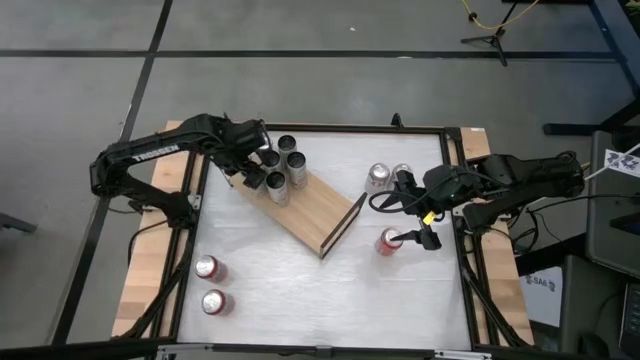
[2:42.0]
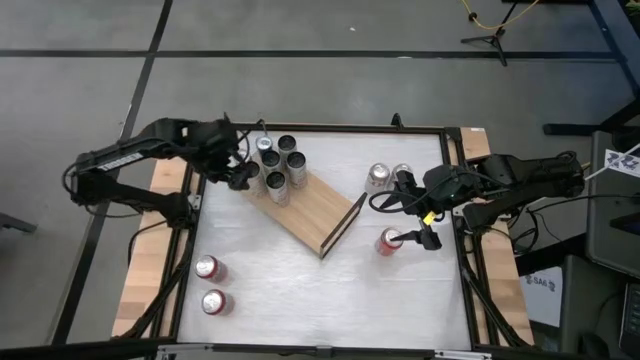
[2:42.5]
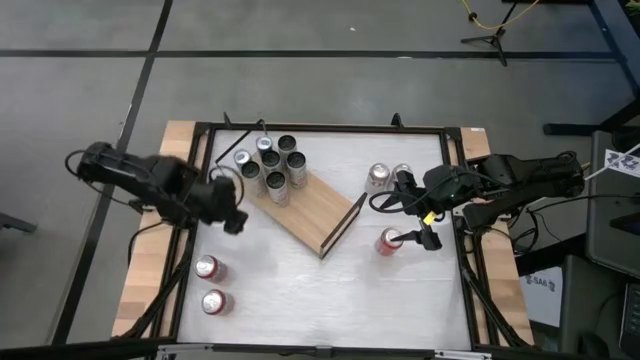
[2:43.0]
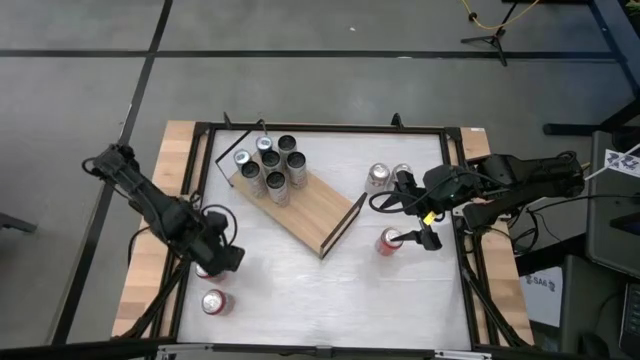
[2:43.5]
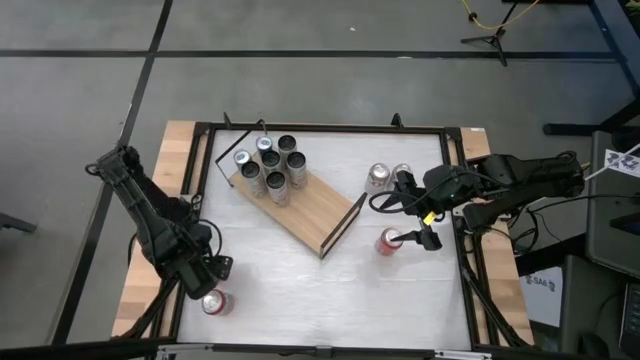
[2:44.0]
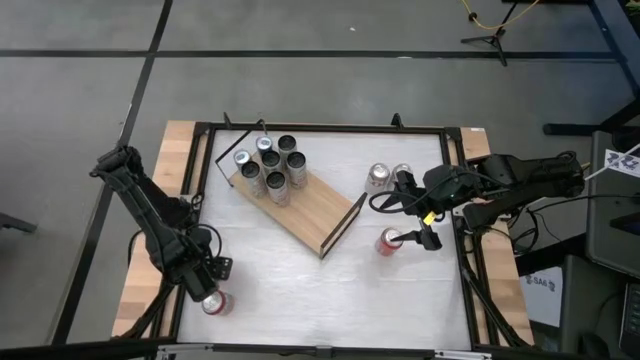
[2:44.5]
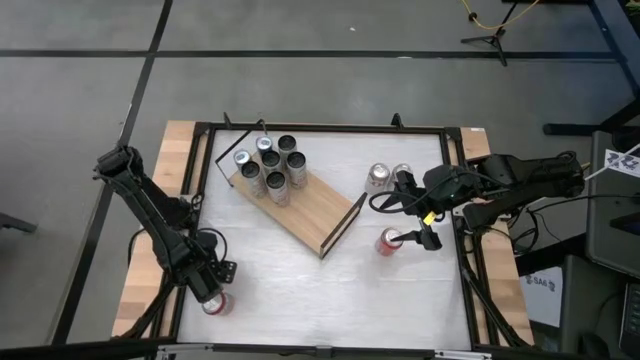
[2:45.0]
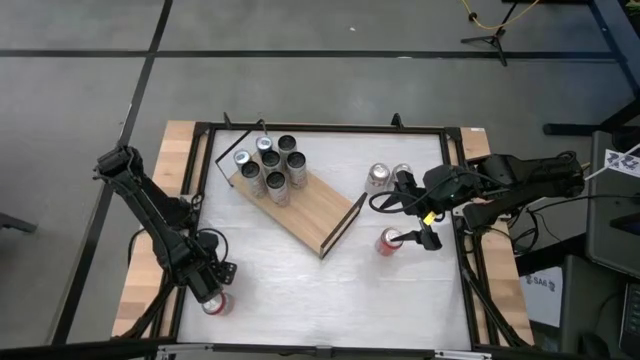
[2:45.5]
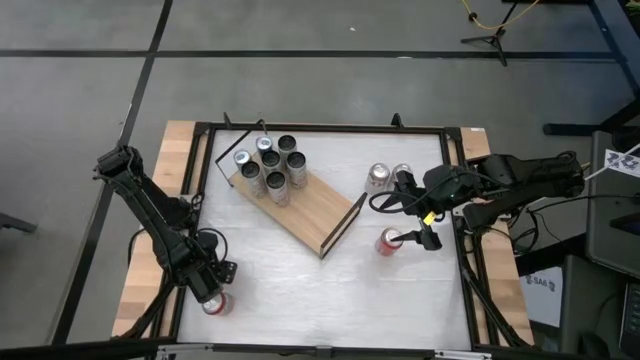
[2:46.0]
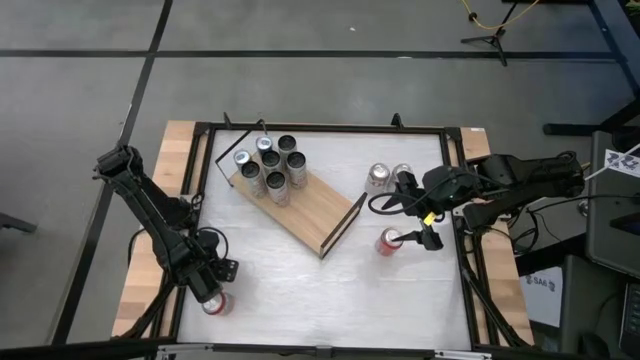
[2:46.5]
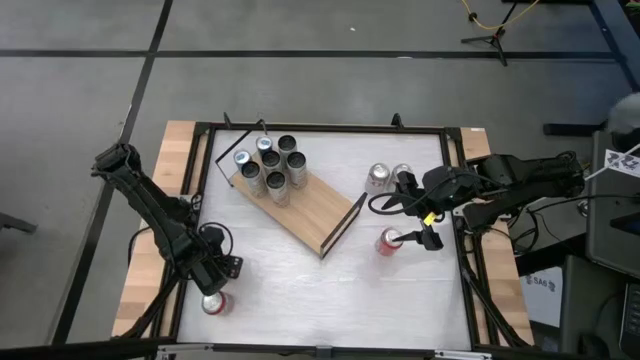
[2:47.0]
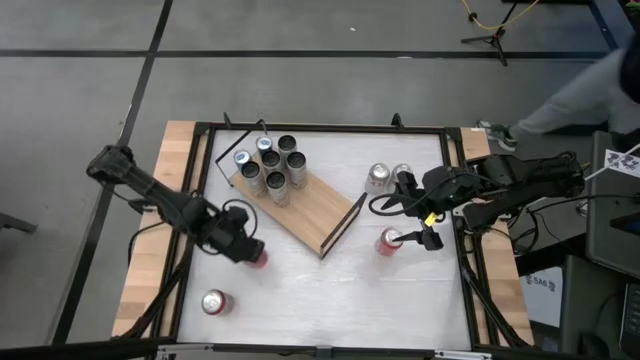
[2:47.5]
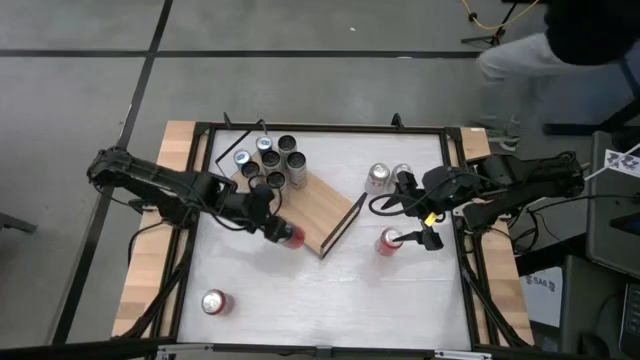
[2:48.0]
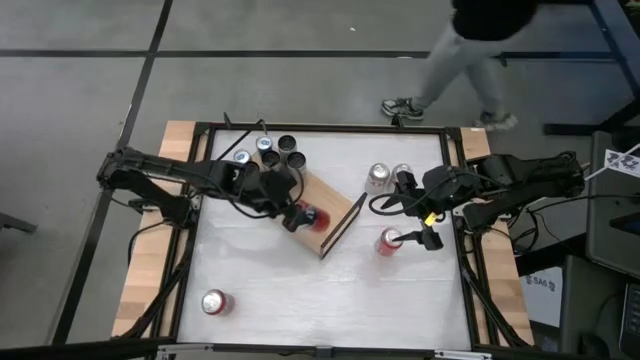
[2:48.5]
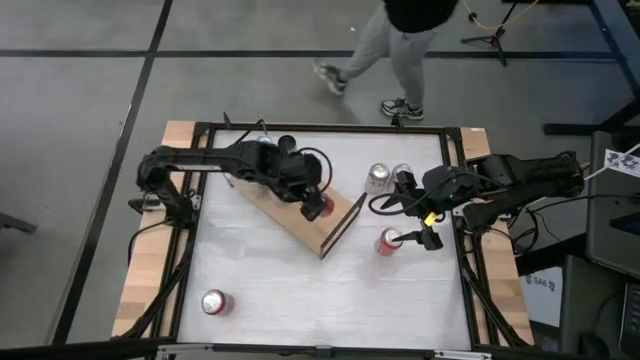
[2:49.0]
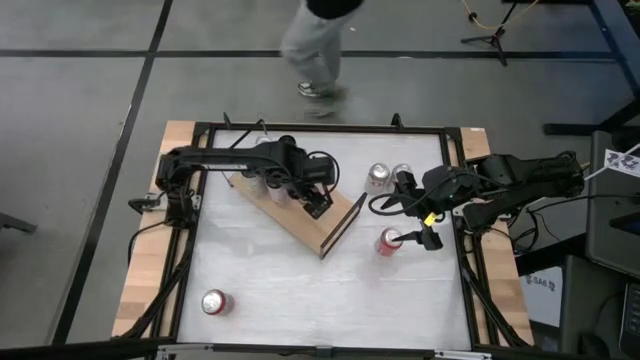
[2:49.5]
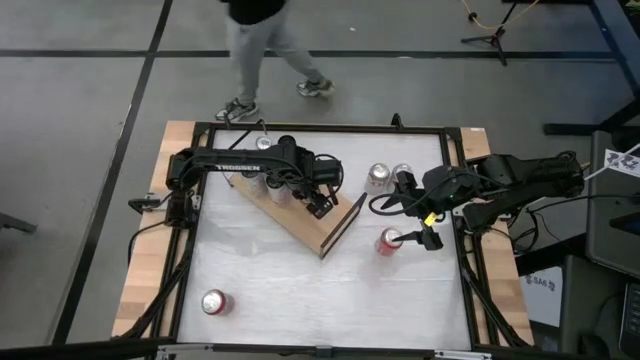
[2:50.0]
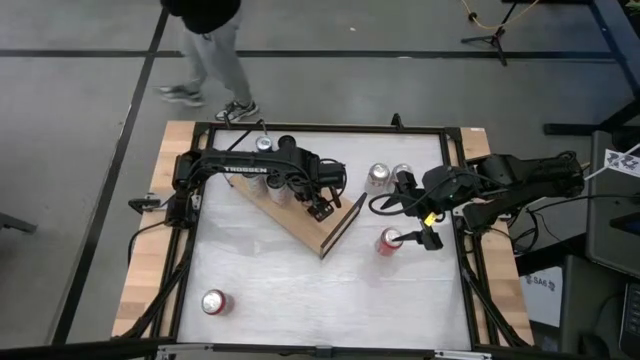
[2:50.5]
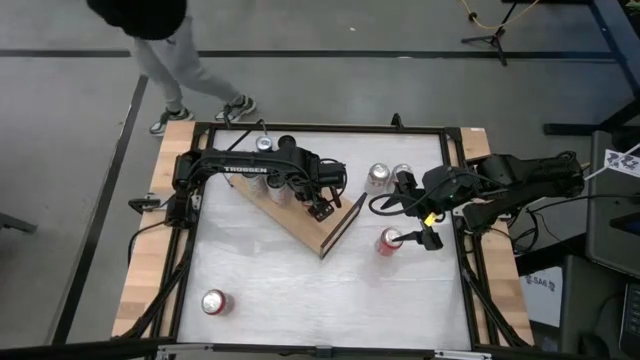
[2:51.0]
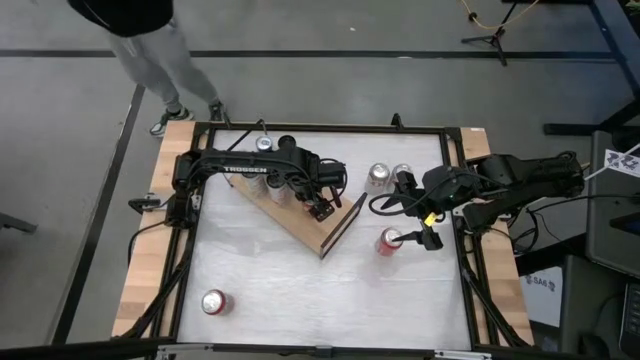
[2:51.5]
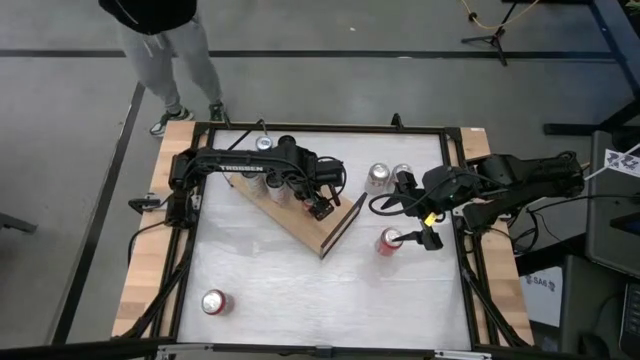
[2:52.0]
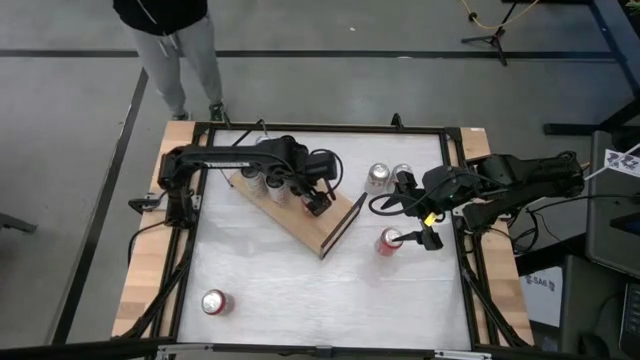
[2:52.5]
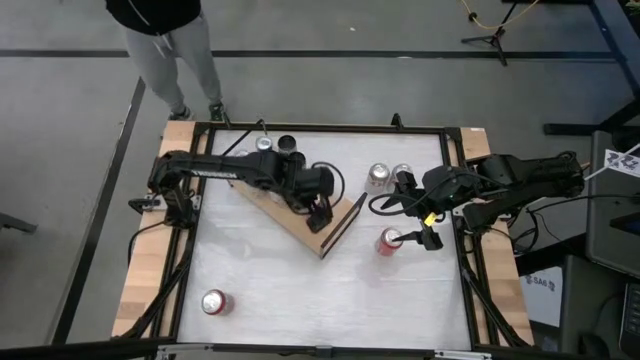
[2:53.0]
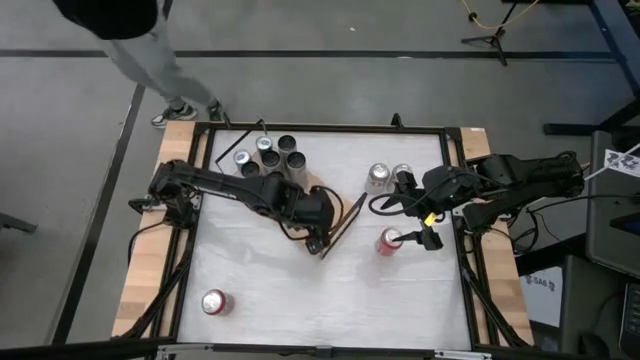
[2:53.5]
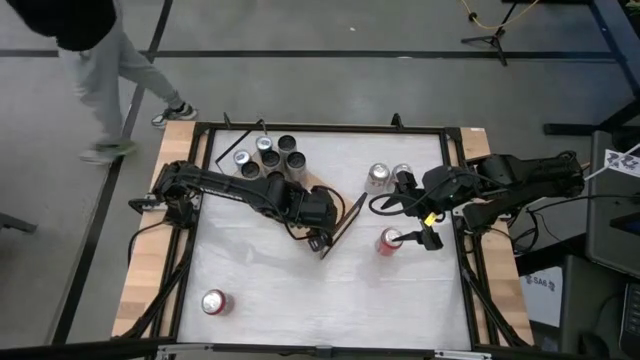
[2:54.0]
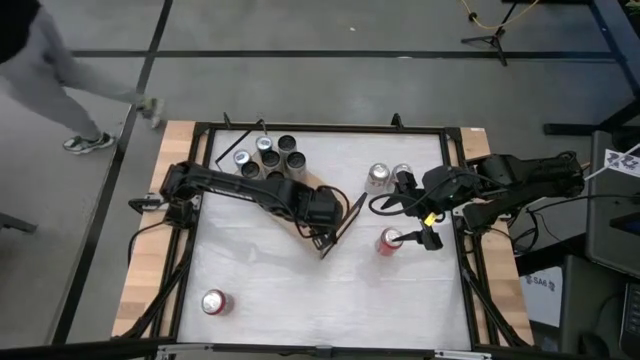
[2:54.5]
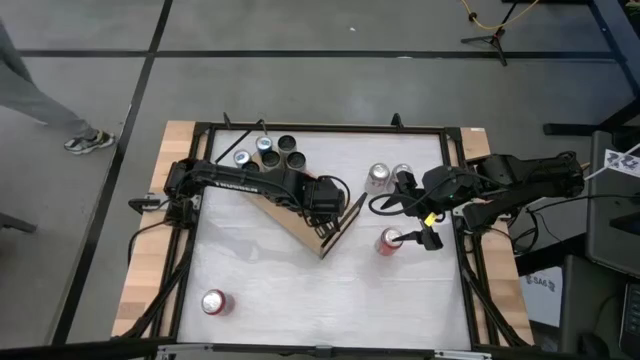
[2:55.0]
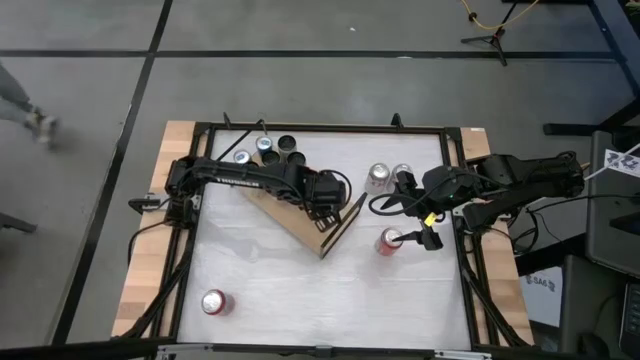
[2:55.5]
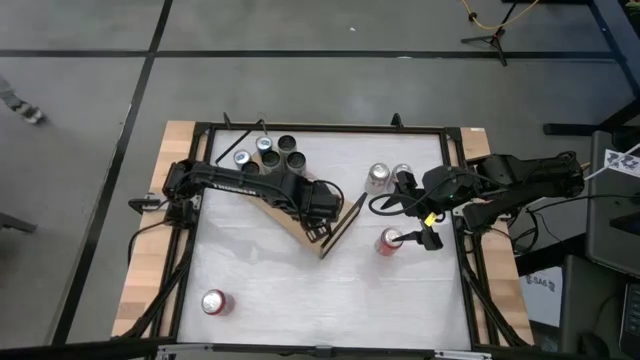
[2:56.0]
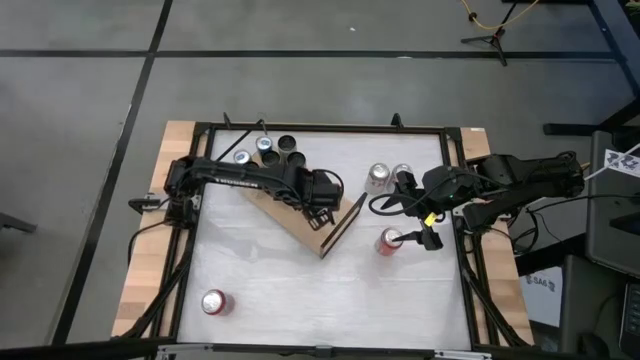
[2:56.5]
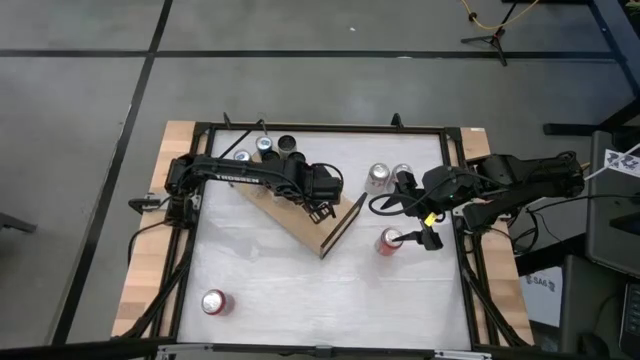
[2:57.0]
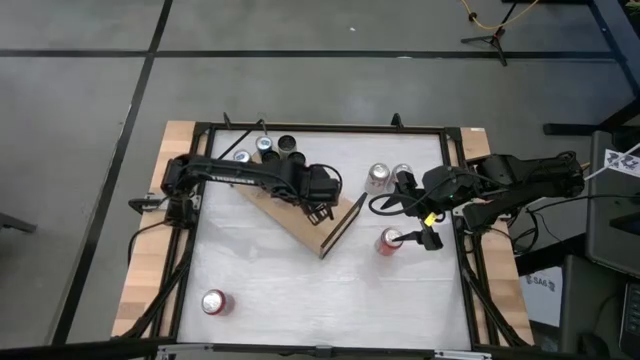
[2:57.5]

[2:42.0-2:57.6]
Task: Place canned beverage on shelf
Put the middle red soda can on the shelf

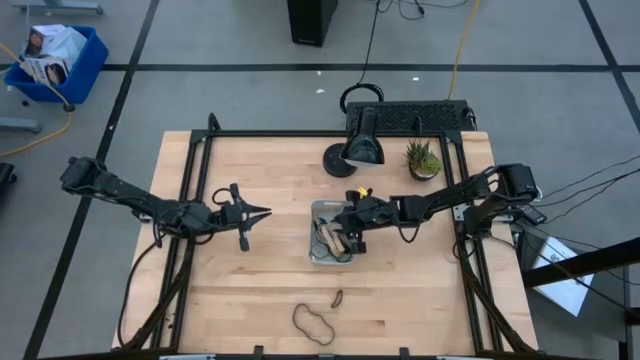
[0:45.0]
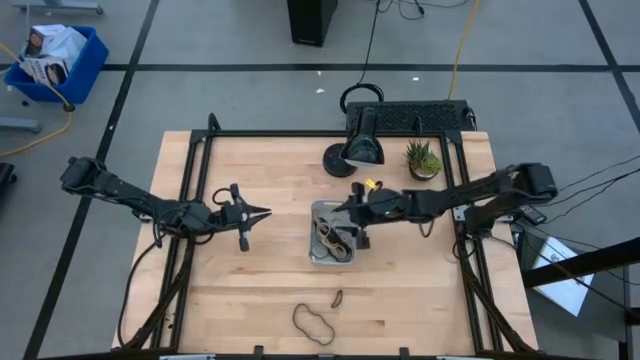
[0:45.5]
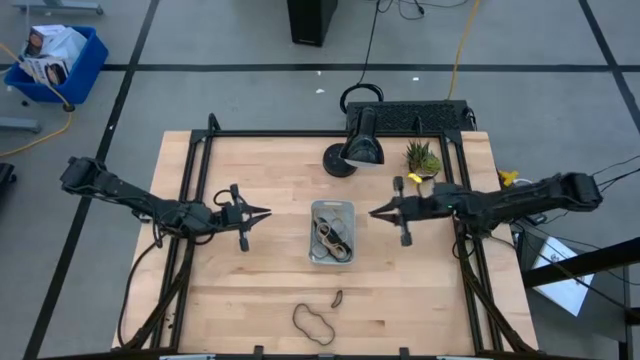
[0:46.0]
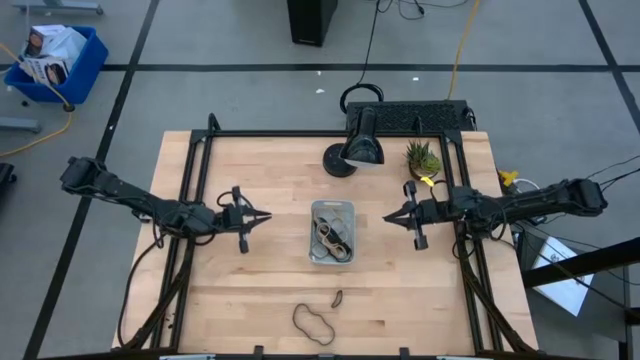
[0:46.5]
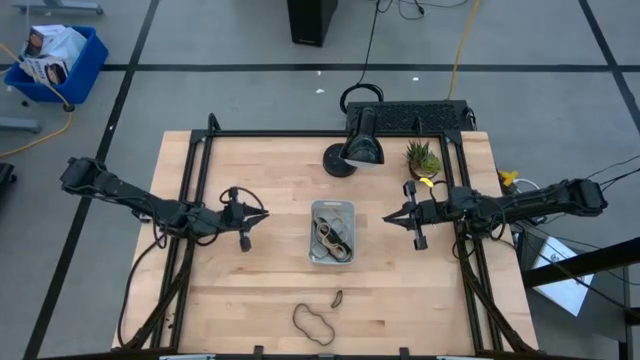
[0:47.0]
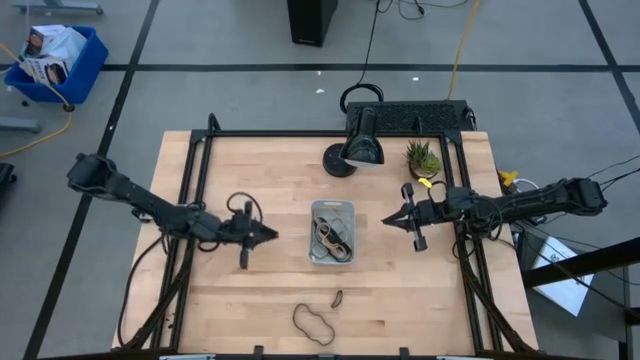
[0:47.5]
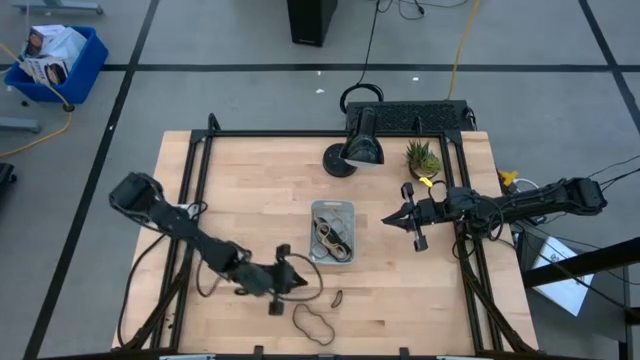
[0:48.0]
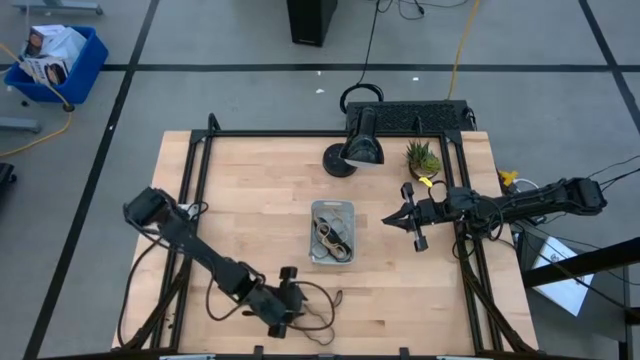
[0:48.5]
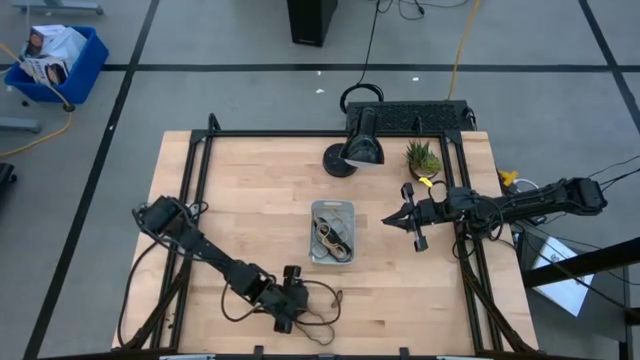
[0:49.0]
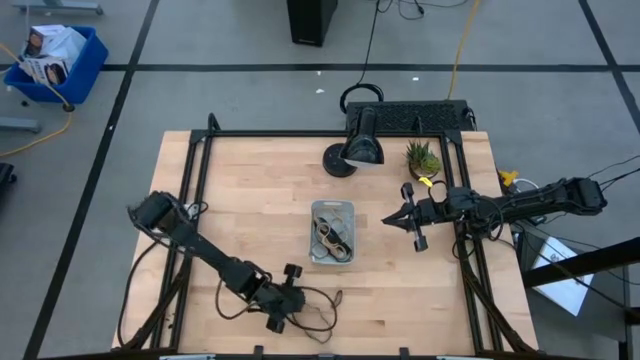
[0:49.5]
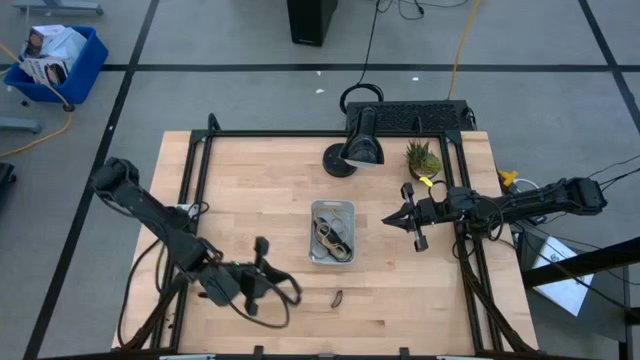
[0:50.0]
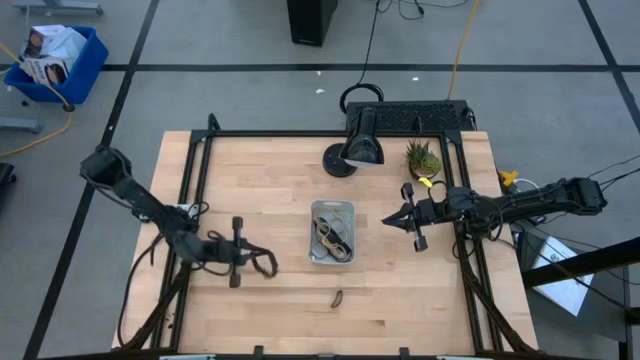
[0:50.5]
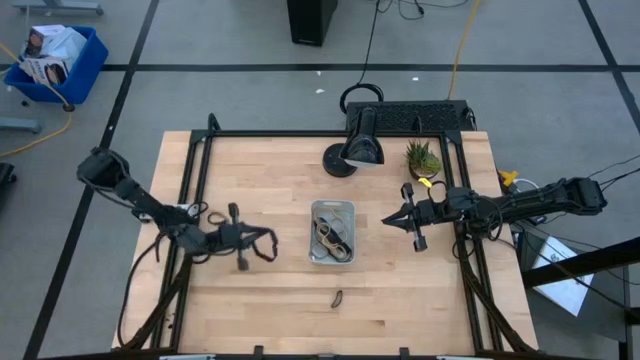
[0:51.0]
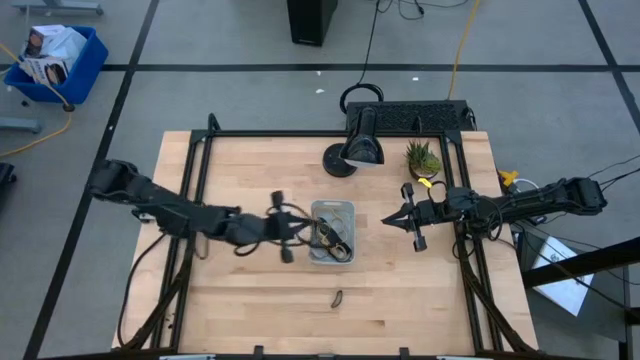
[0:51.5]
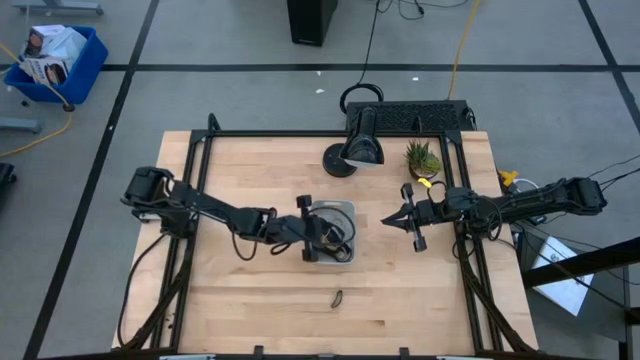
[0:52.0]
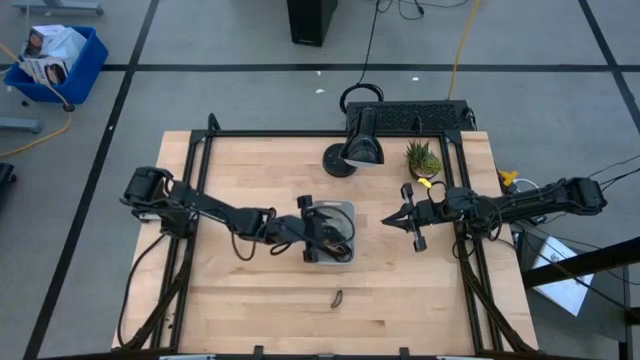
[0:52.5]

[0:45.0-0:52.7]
Task: Pick and place rubber bands into bin
Put the bottom black rubber band into the gray bin
